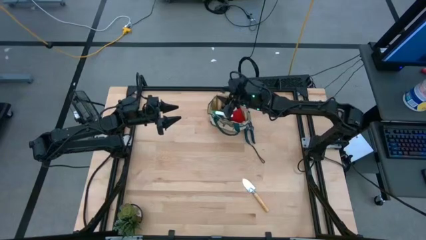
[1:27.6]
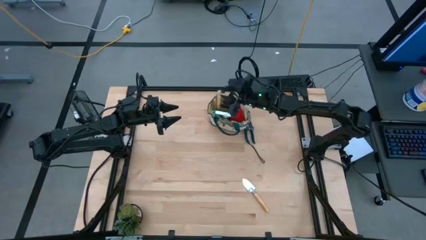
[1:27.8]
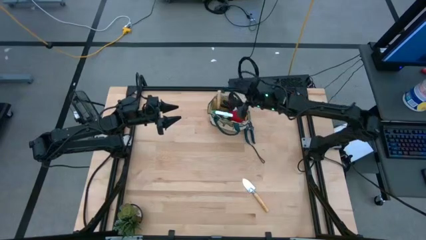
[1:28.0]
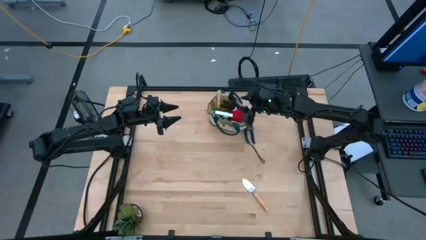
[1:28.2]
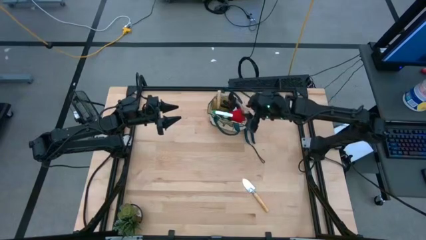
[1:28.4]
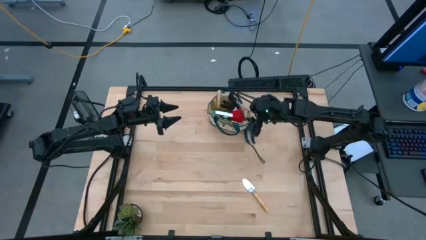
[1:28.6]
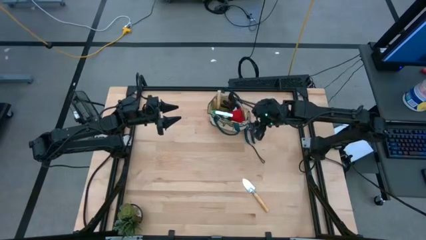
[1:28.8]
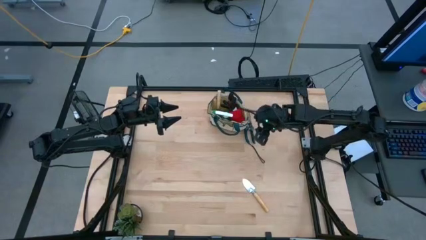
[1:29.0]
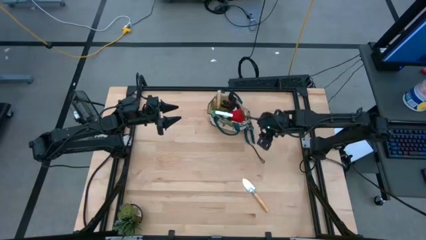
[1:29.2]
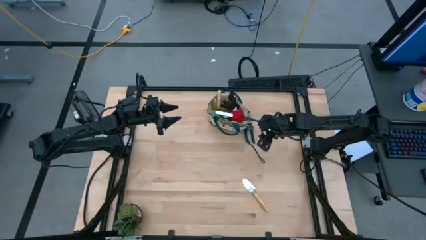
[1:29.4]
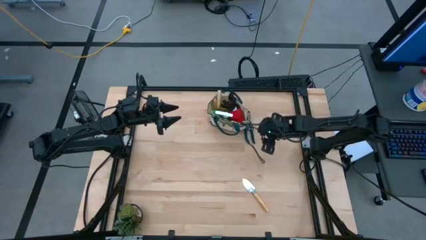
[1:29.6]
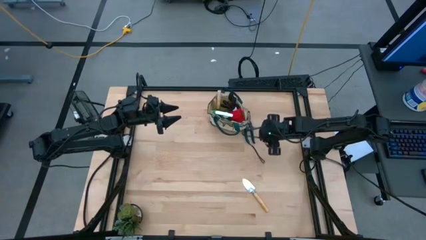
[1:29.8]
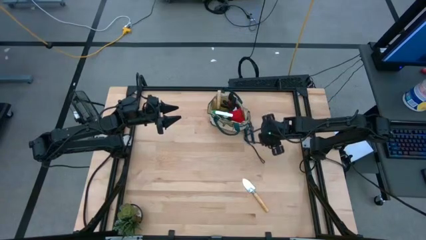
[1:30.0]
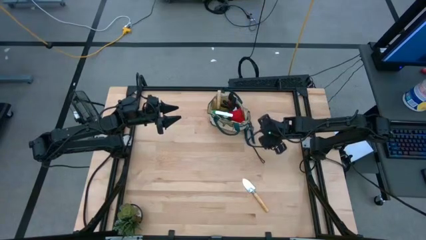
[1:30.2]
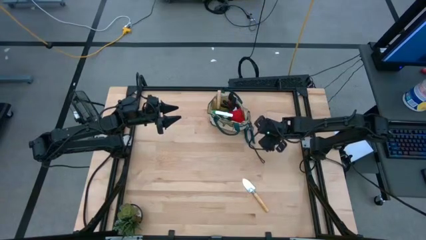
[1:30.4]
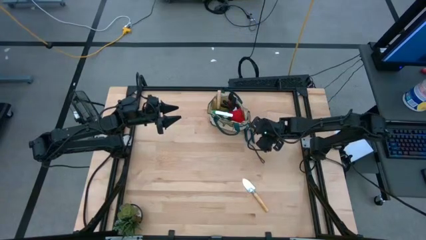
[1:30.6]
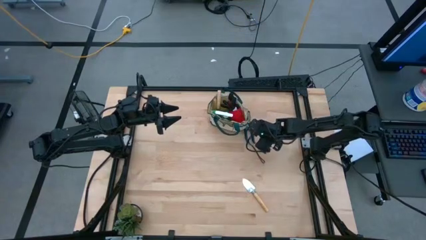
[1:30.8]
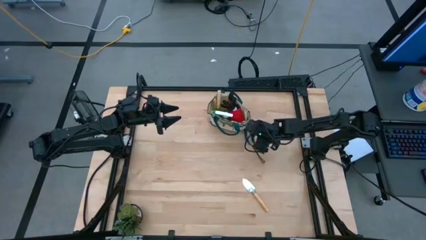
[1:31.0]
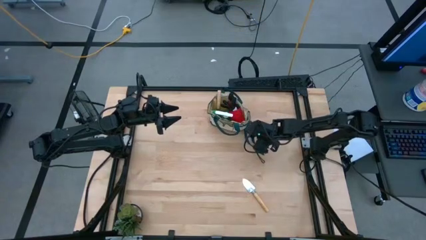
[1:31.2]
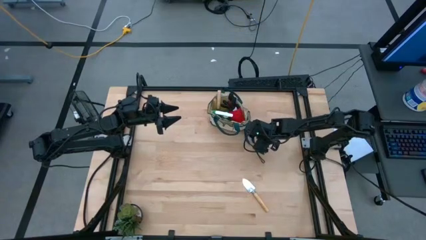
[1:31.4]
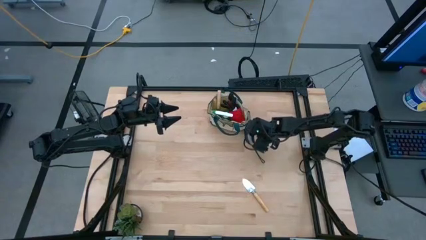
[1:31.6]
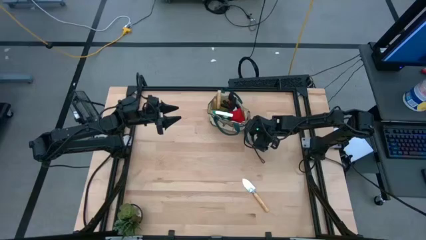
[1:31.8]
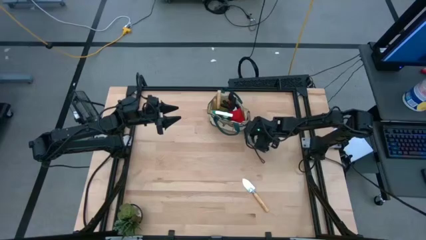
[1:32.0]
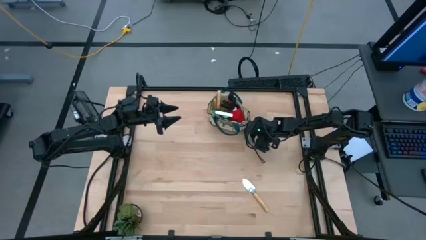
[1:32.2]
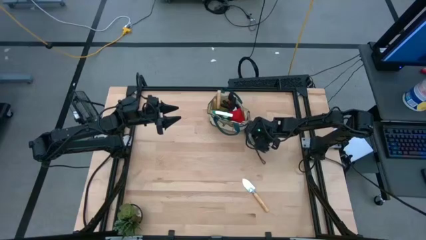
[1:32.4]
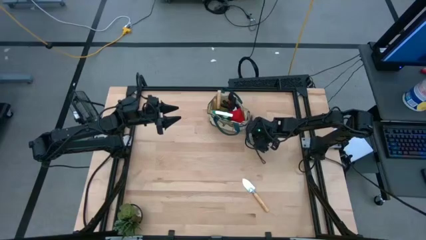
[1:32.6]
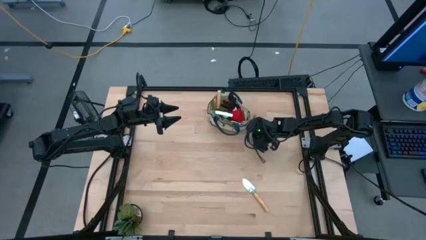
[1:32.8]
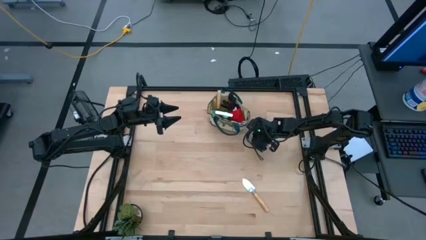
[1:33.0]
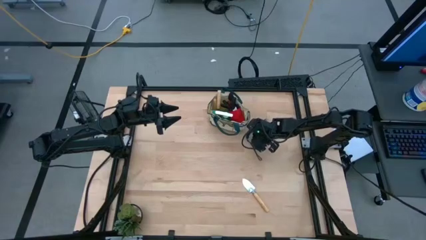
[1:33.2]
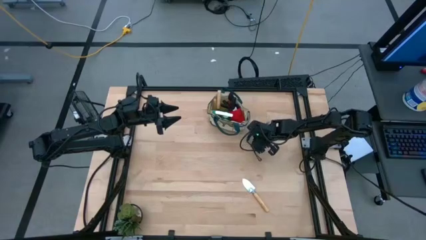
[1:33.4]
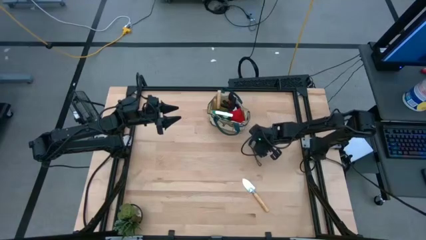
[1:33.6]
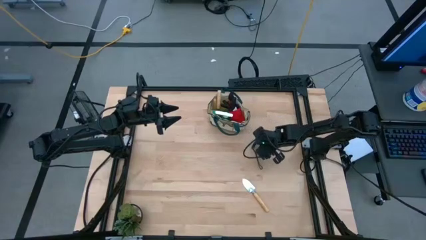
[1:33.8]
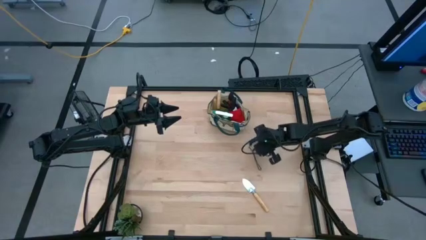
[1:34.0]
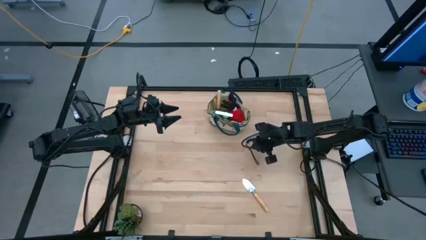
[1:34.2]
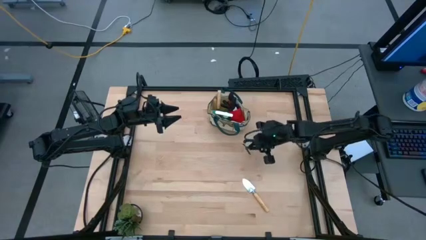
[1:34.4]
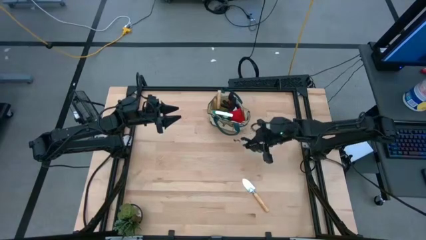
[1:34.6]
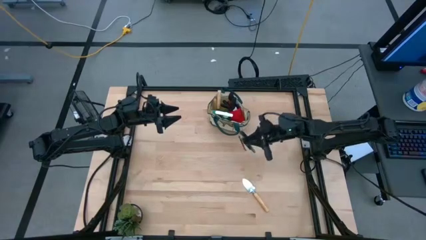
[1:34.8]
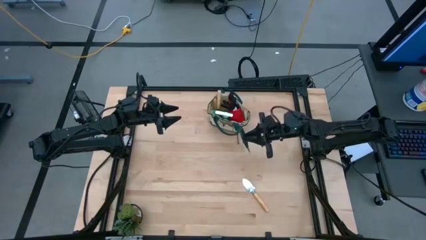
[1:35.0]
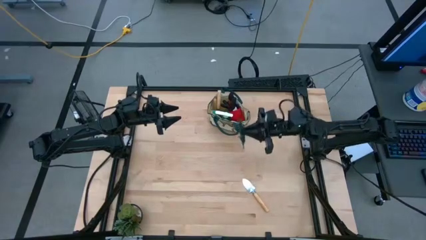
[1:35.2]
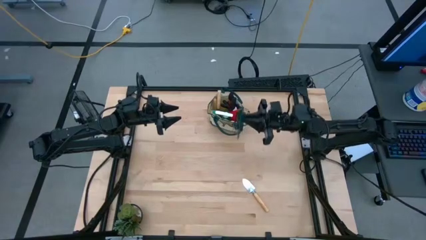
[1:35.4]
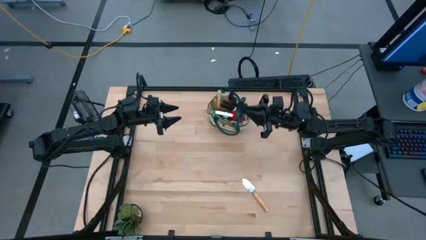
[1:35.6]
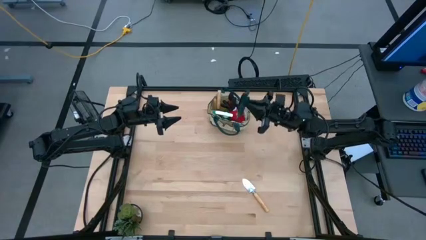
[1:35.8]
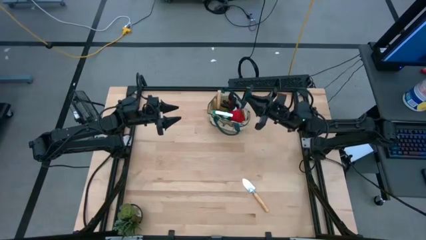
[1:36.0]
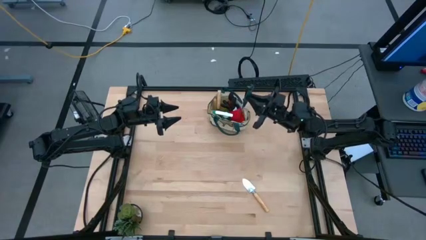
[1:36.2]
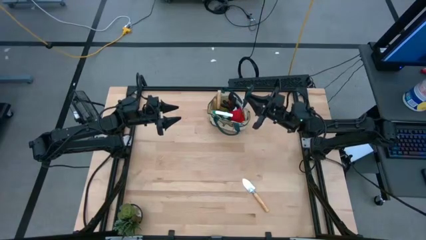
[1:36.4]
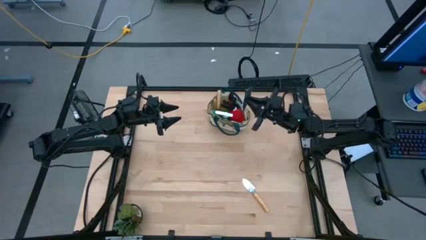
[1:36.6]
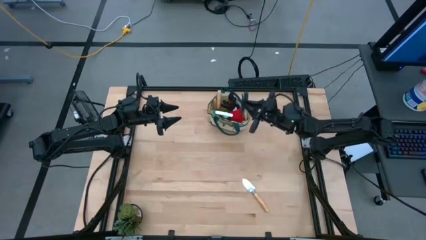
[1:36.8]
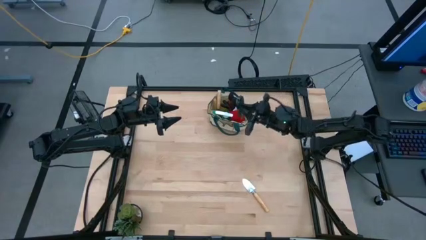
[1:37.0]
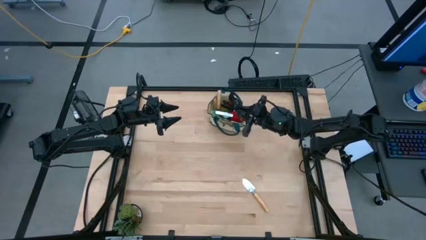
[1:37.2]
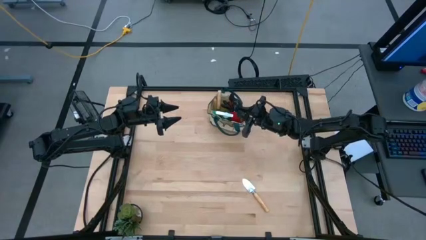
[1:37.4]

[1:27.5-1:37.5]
Task: Pick & Place Garden tools in Gardening bag
Put the black shear scissors into the green gardening bag

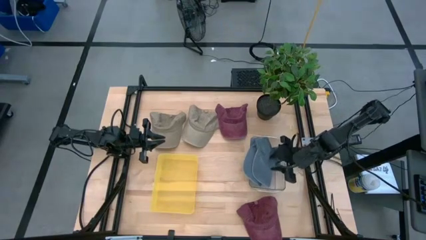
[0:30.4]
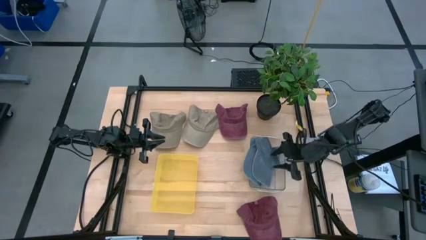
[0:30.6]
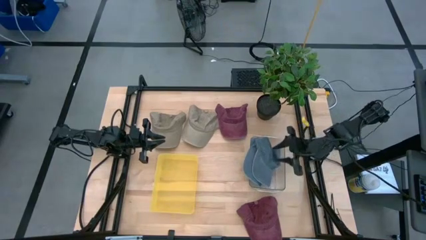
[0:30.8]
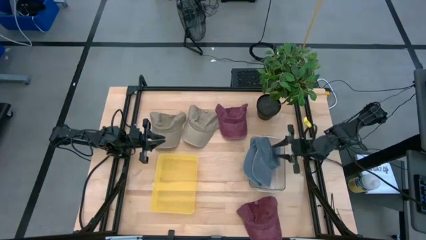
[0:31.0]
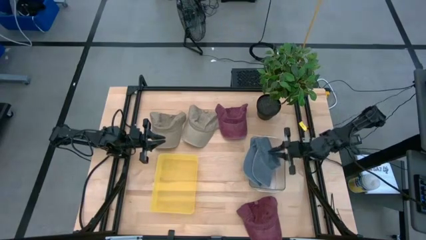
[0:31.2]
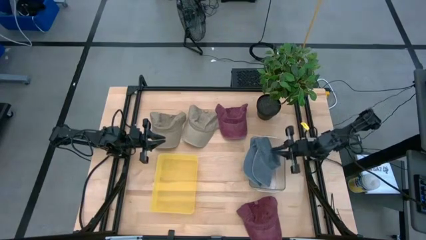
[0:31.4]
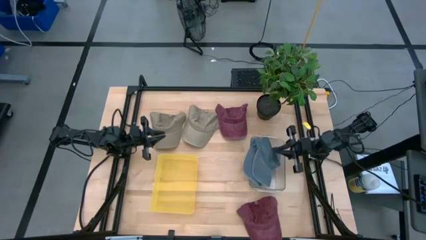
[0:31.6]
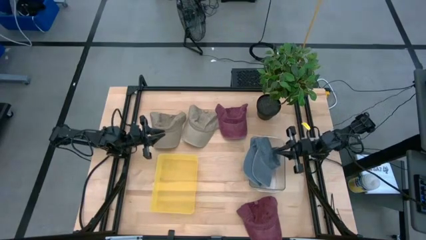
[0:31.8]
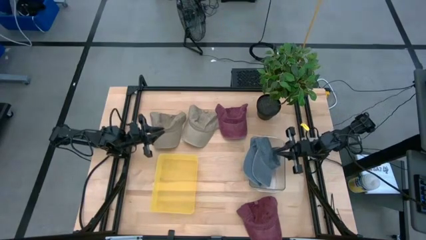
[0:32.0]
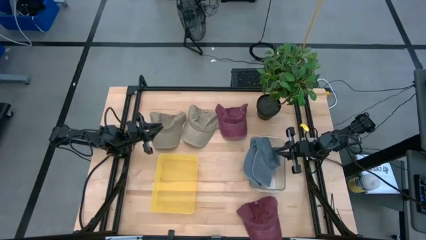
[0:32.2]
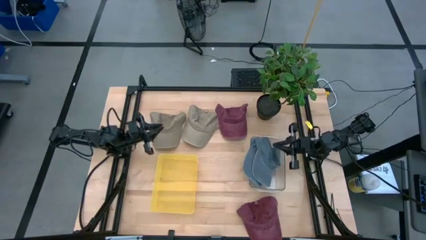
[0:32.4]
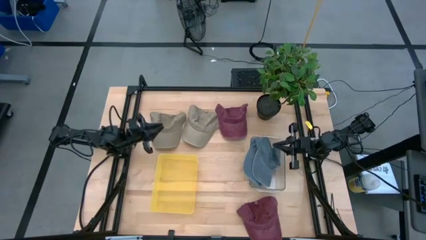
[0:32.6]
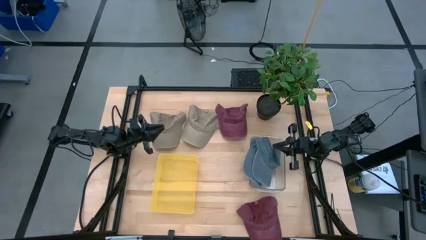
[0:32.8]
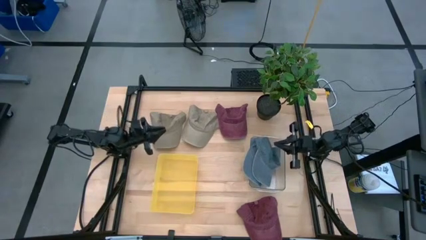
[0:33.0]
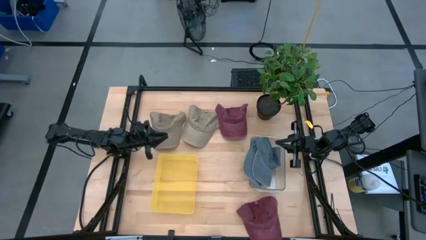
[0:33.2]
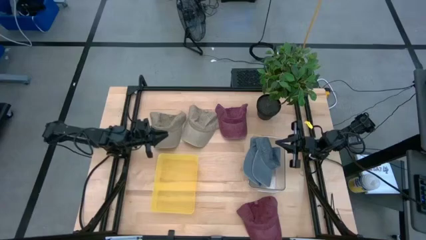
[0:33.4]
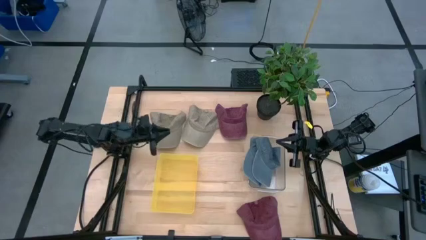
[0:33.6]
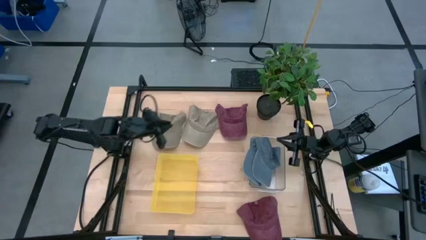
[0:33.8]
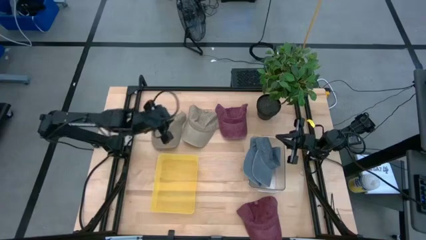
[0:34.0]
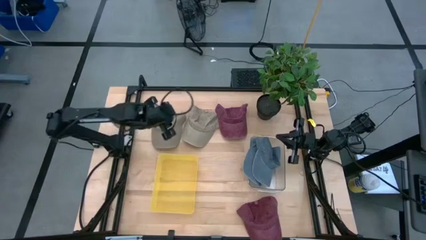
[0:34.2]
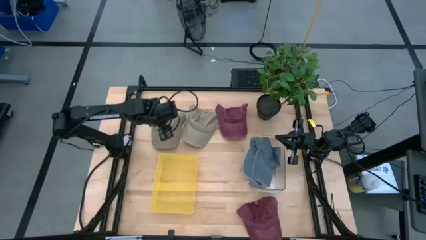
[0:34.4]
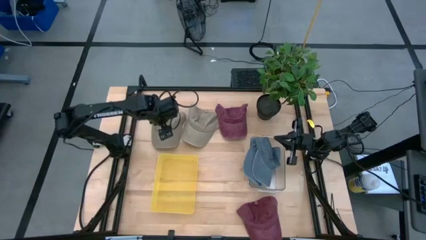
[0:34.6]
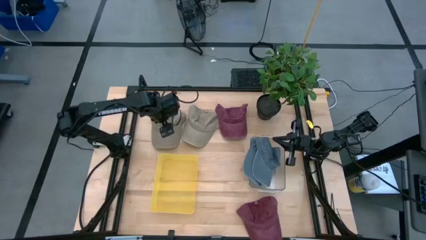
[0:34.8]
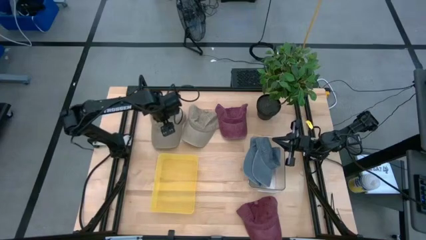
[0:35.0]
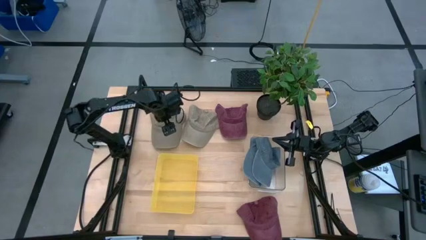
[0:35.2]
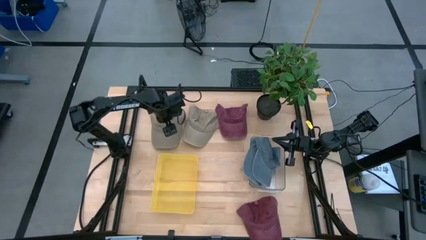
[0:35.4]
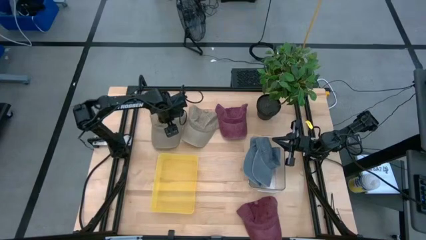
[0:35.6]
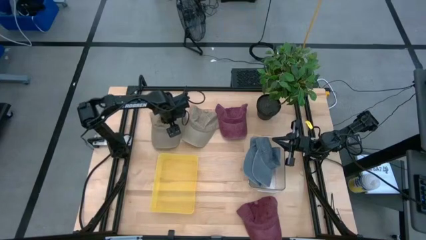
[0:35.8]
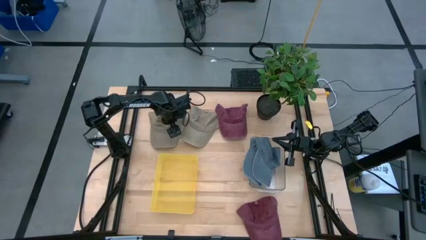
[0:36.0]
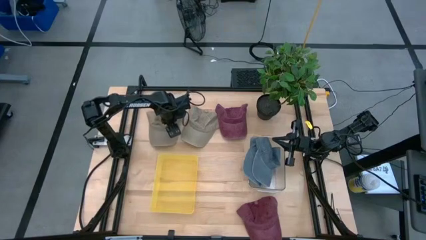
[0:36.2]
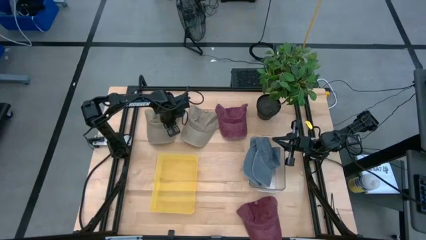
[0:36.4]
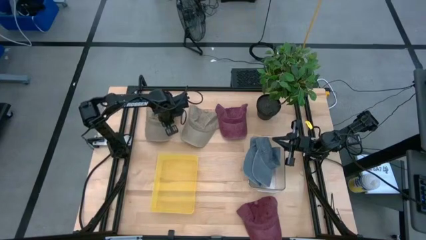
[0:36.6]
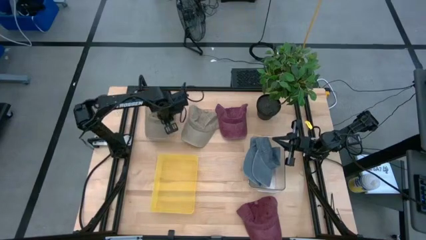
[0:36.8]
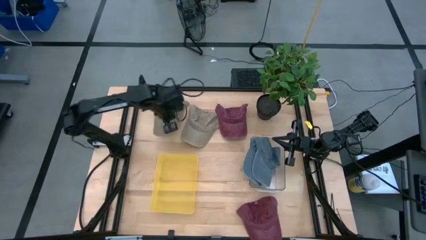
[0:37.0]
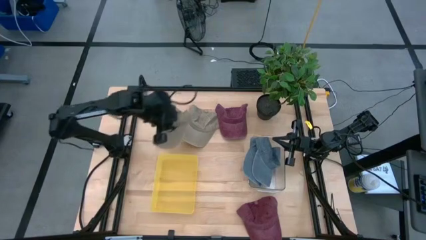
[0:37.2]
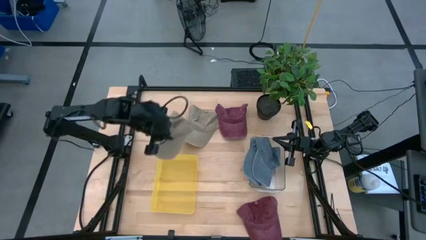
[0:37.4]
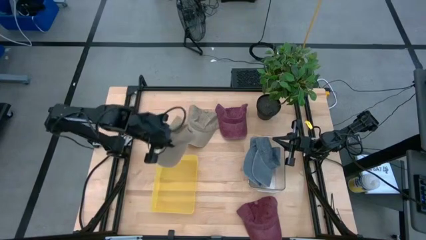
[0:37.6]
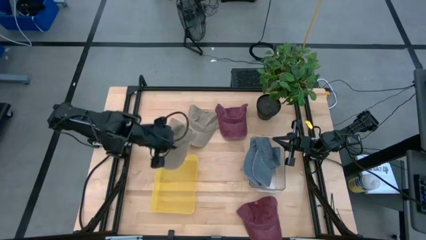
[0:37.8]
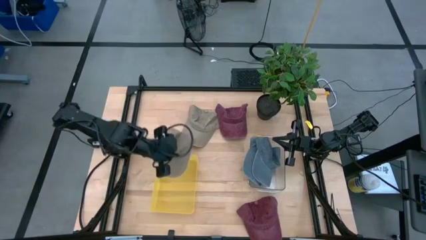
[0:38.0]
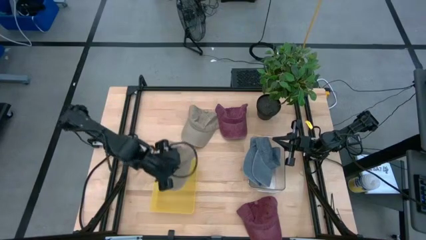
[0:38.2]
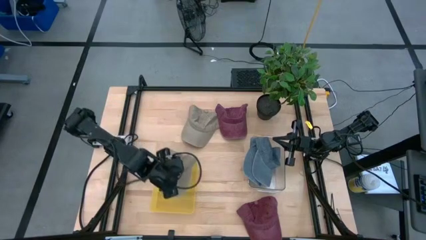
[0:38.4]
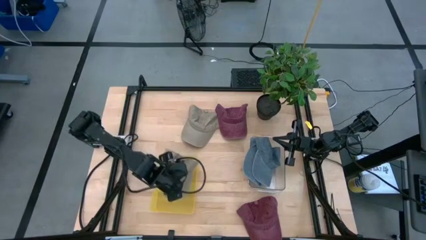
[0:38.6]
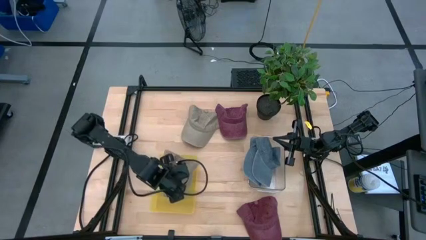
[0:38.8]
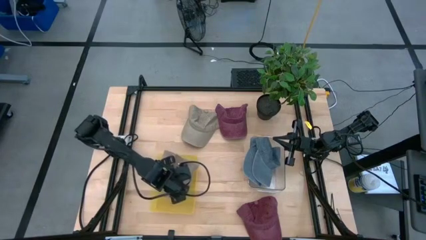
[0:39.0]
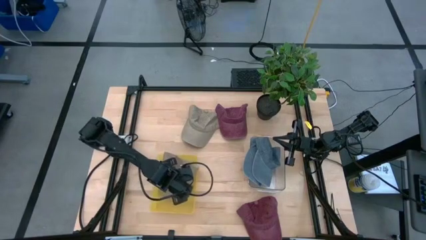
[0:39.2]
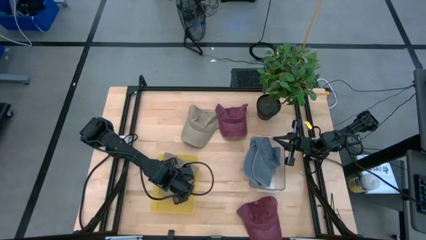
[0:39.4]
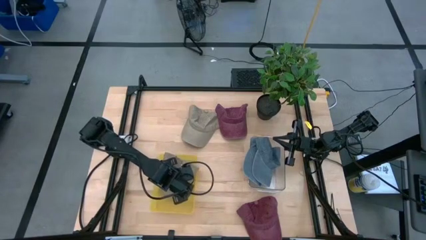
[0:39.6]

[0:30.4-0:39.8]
Task: Pick & Place hat
Put the left brown cap into the yellow bin
